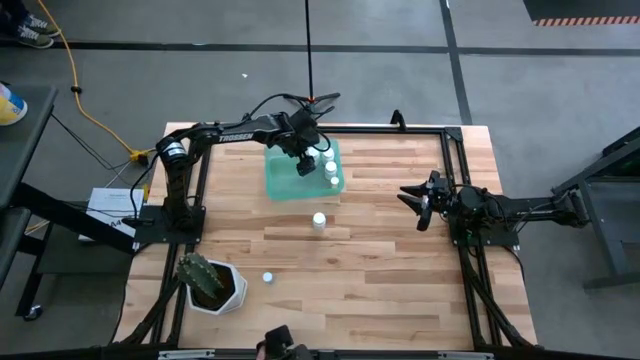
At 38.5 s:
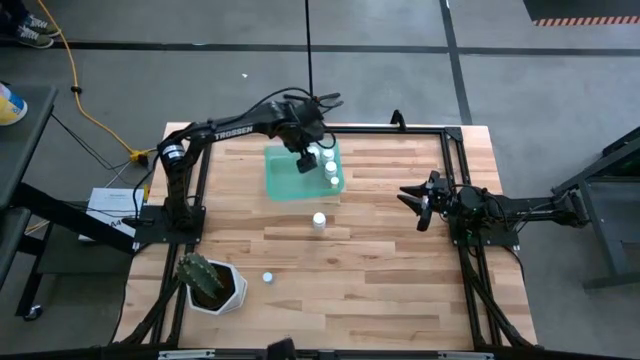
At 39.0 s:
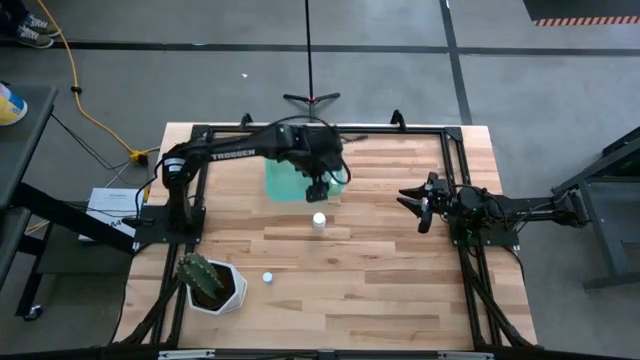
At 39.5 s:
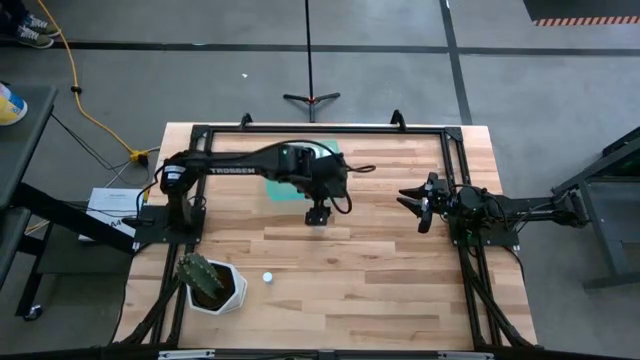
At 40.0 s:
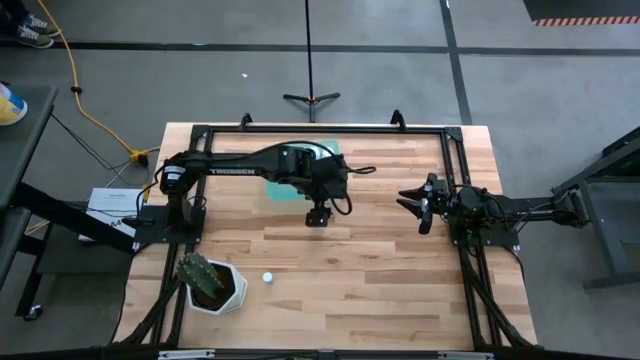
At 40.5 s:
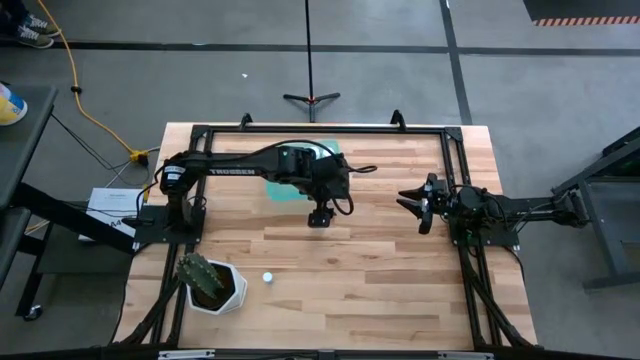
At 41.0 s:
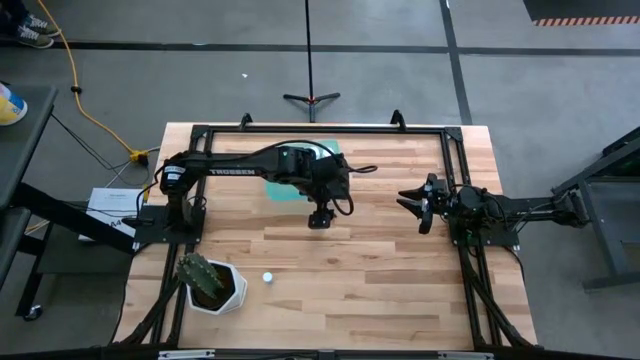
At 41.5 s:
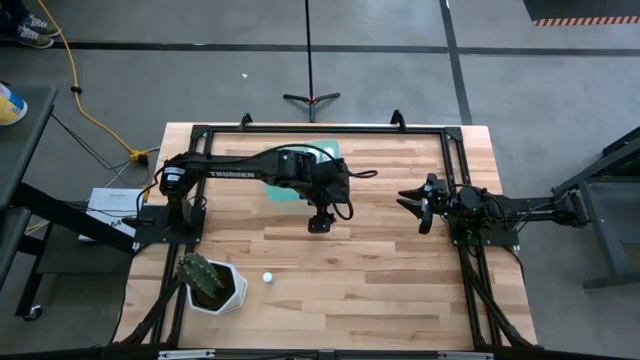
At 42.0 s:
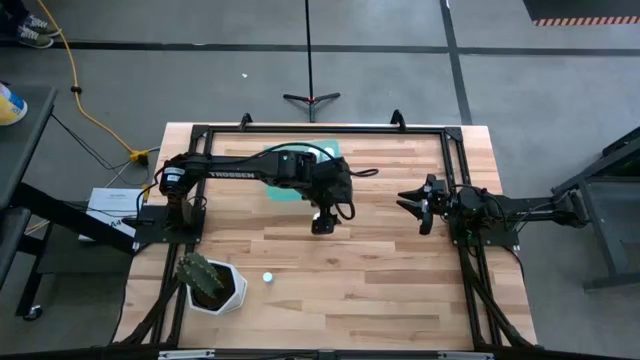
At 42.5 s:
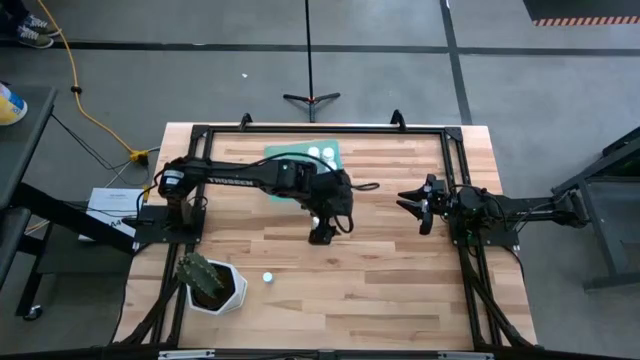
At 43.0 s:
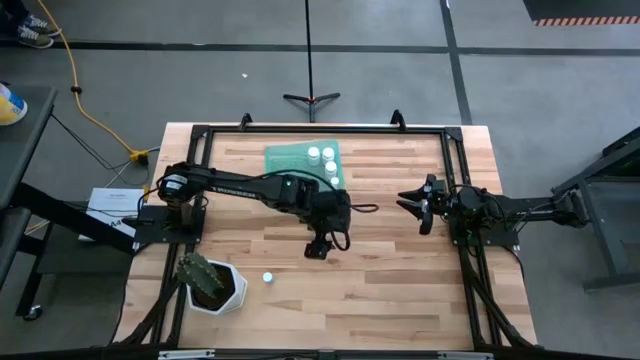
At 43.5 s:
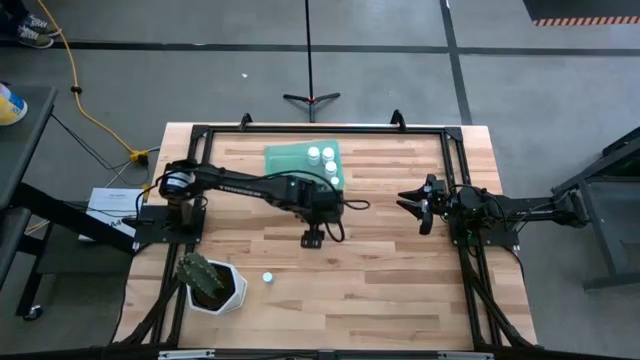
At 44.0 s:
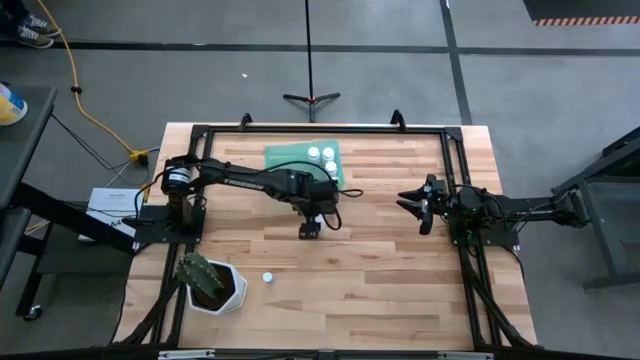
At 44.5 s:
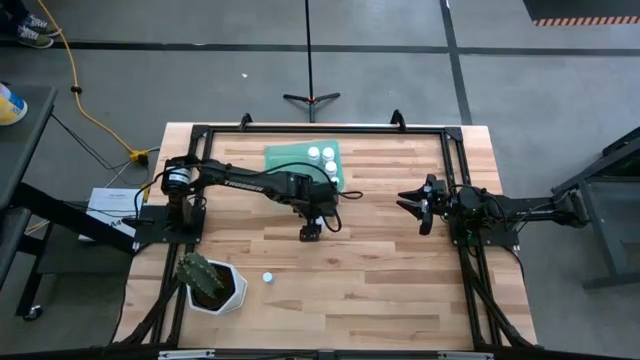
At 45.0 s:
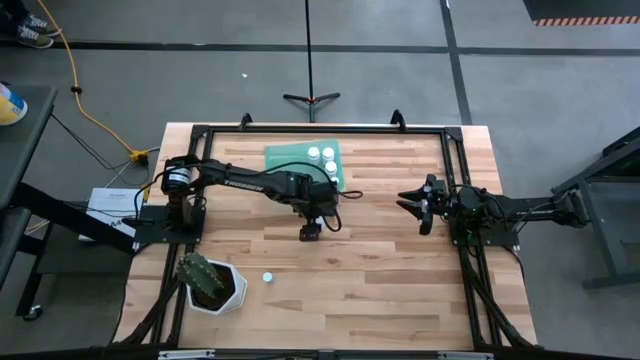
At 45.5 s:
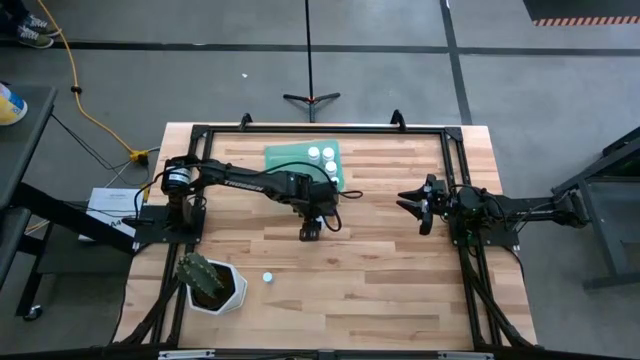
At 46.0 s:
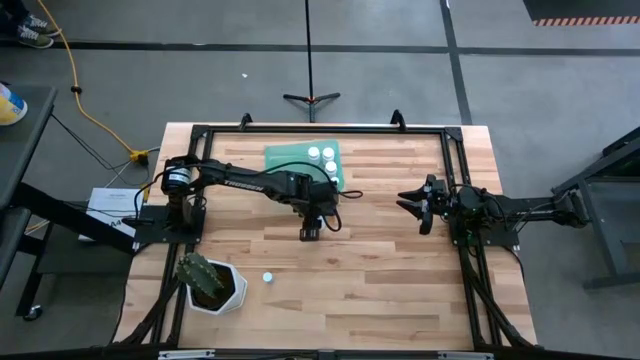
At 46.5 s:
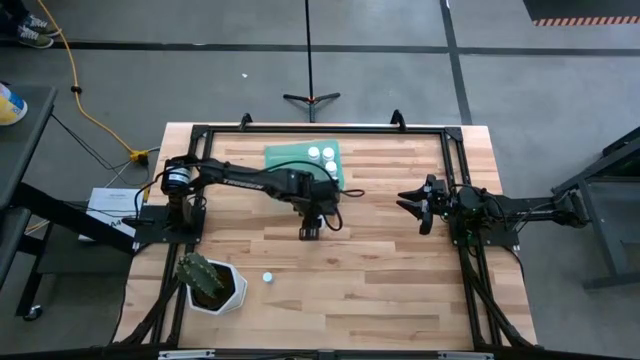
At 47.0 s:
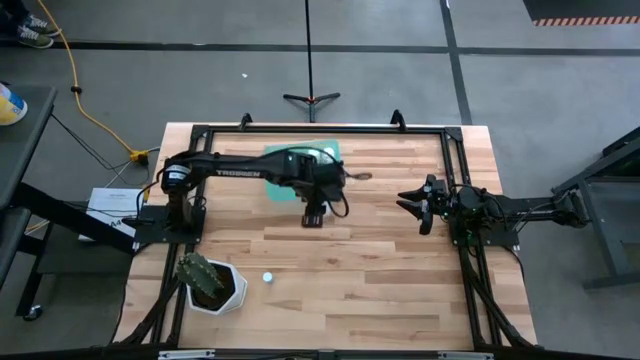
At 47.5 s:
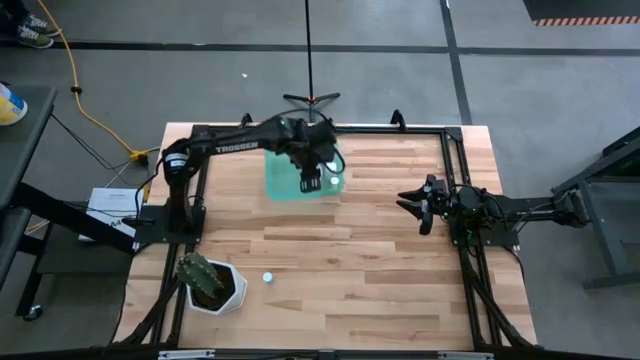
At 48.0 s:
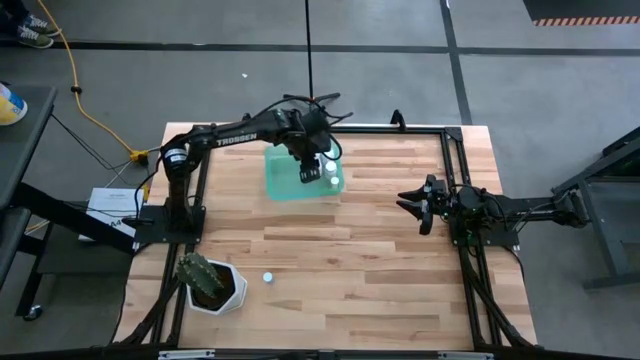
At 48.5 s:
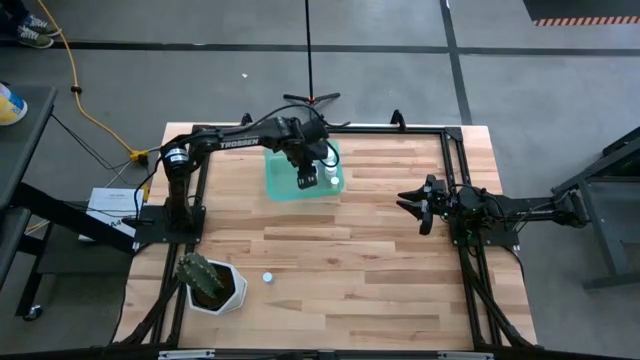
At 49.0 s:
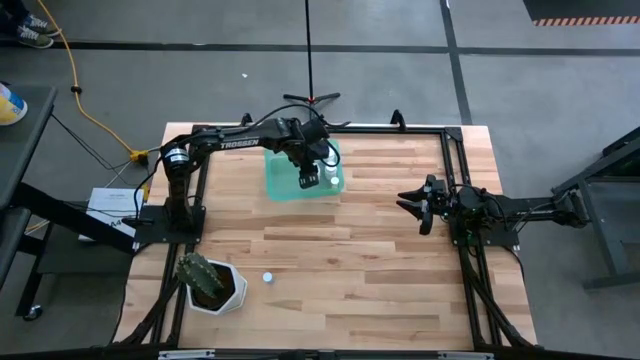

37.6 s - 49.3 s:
Task: Pick and place pill bottles into a basket
Put the white pill bottle into the green bin

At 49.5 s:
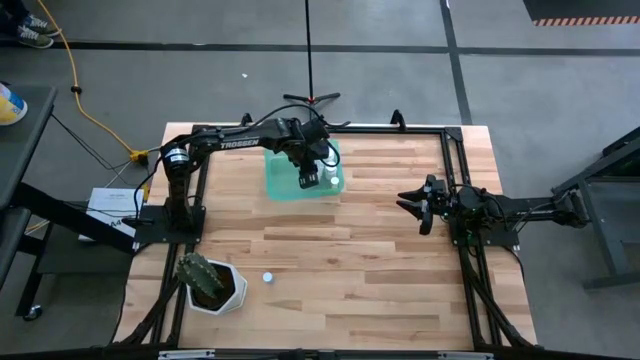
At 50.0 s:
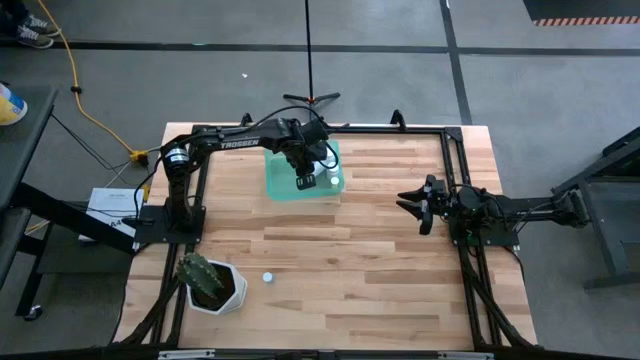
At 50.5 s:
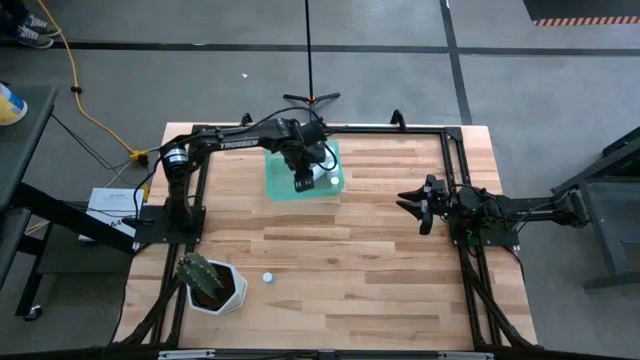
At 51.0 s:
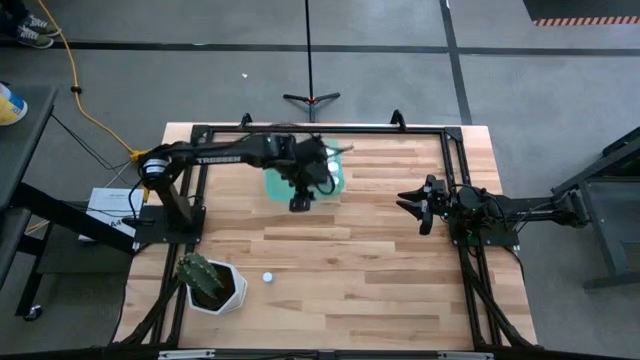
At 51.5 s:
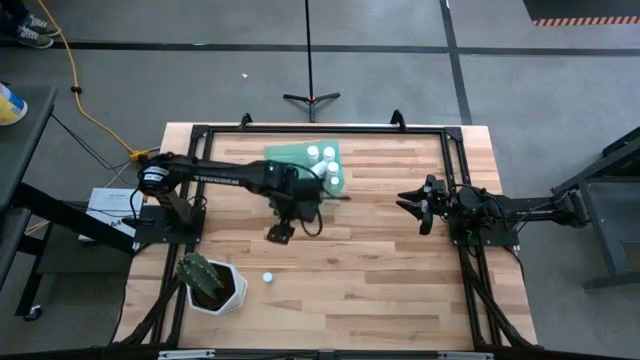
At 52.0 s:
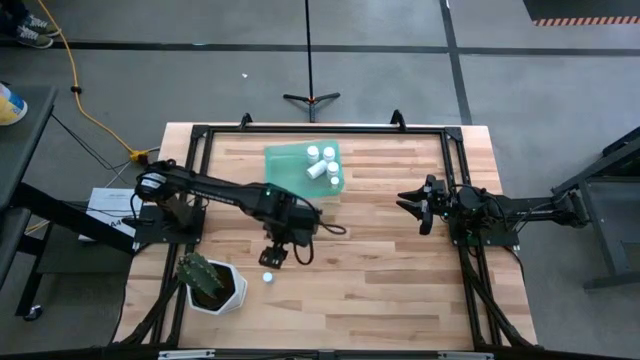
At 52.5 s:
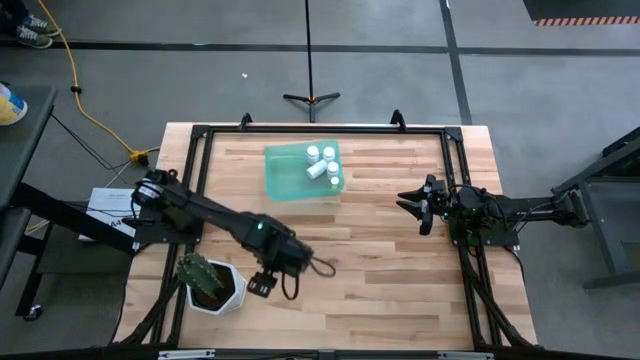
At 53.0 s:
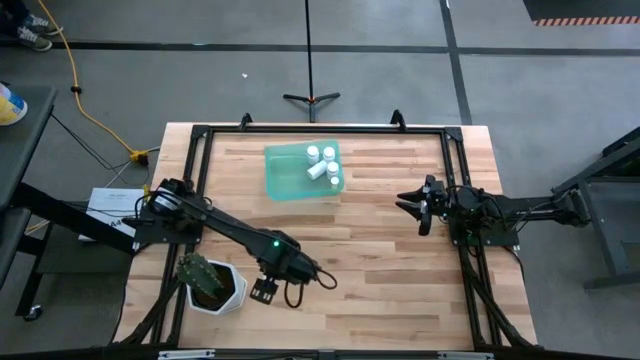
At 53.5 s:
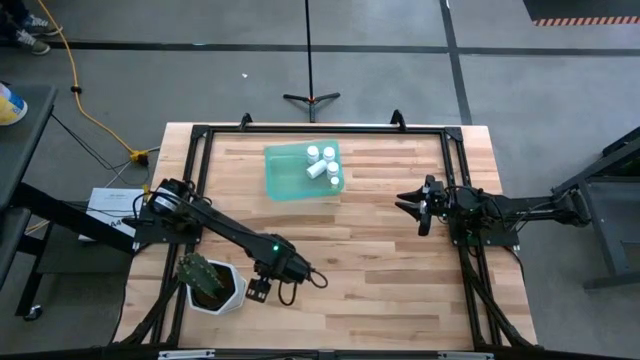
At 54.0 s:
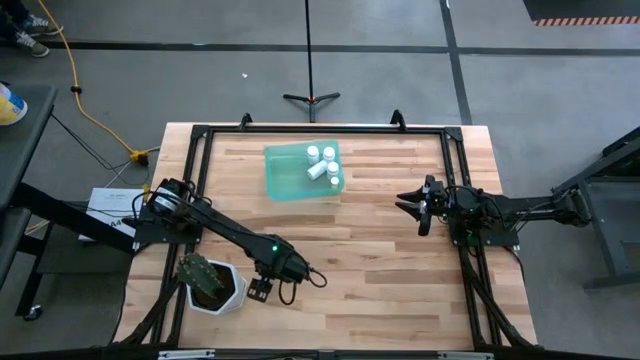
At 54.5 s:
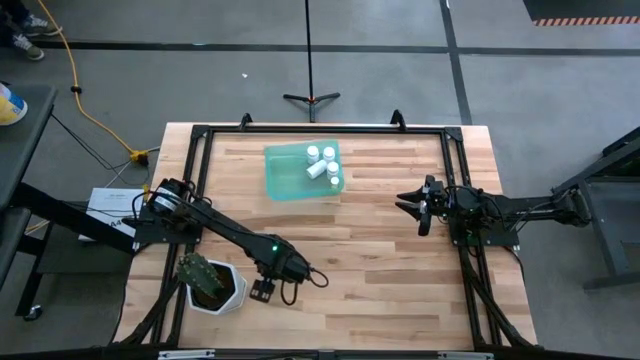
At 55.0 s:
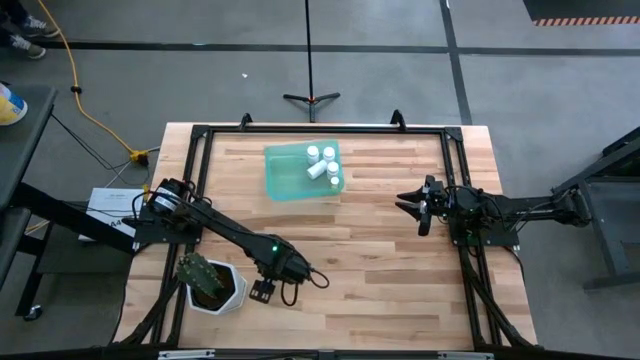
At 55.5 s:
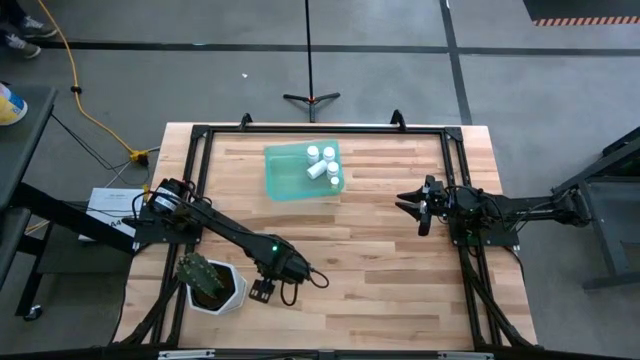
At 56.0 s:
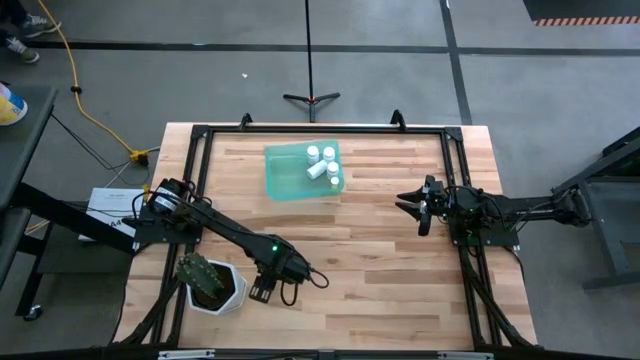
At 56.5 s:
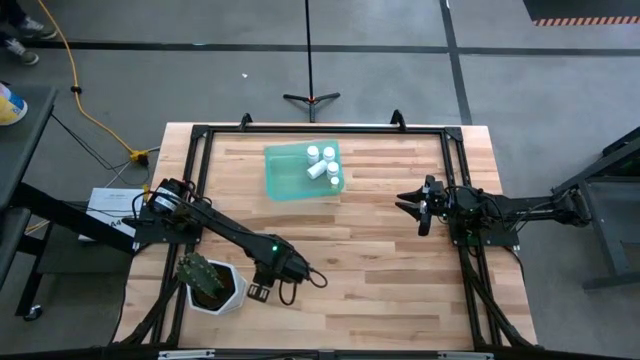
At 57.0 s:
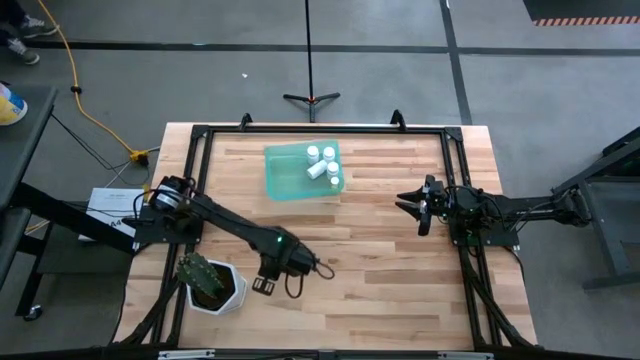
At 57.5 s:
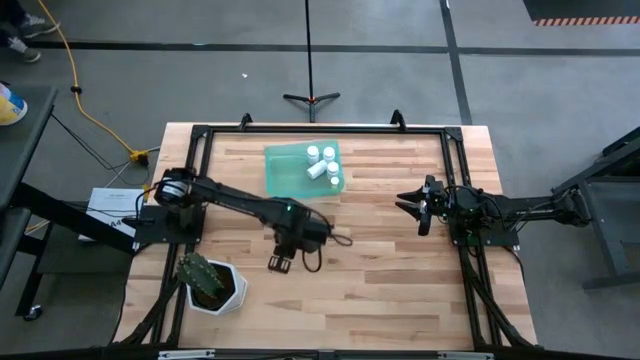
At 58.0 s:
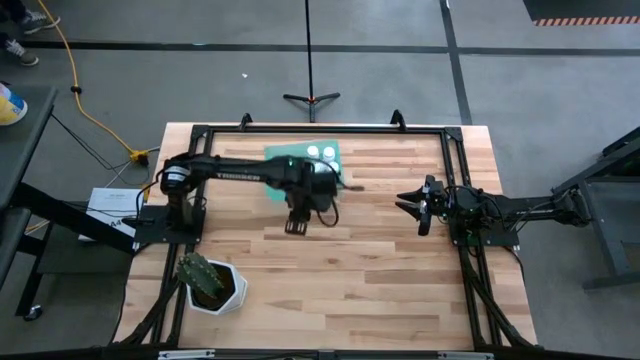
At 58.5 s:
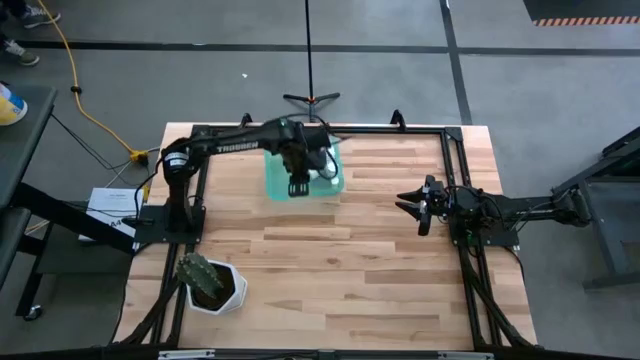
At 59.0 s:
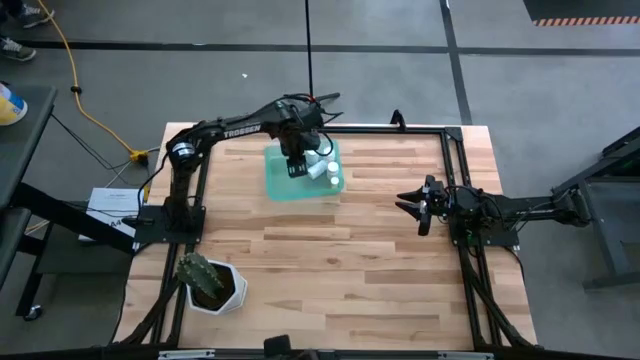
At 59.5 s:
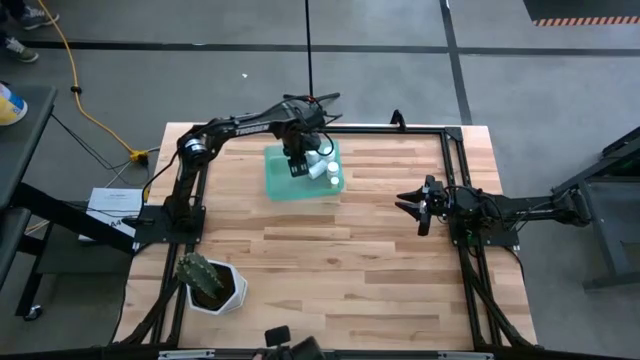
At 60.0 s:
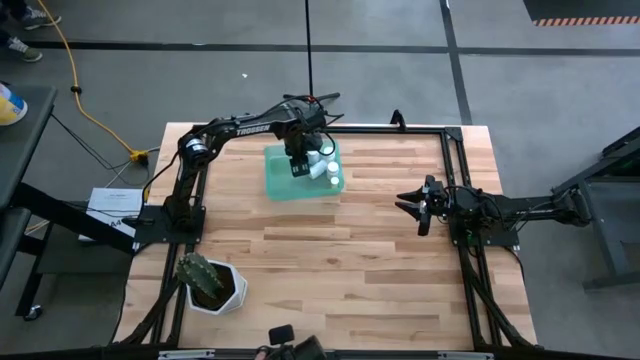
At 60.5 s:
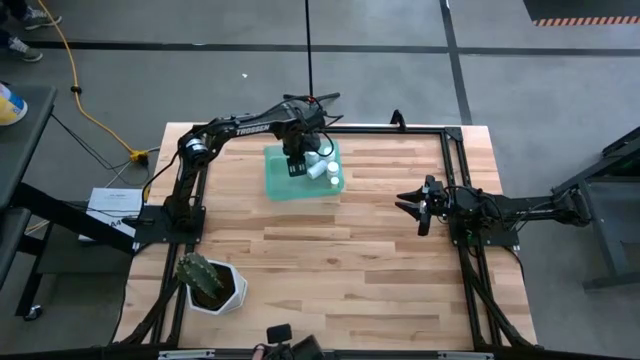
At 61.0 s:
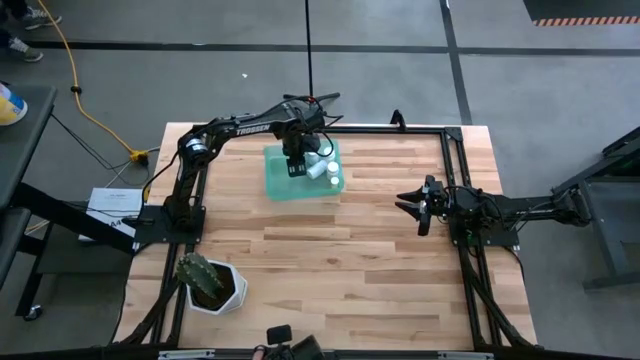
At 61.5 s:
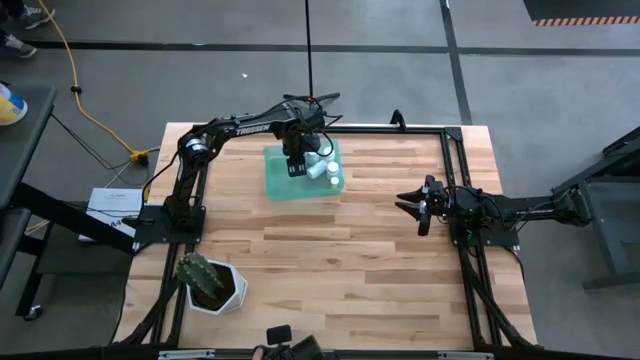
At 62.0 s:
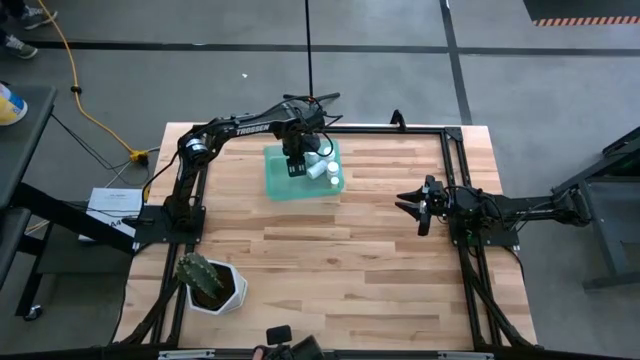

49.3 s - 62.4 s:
Put the blue pill bottle into the green bin
